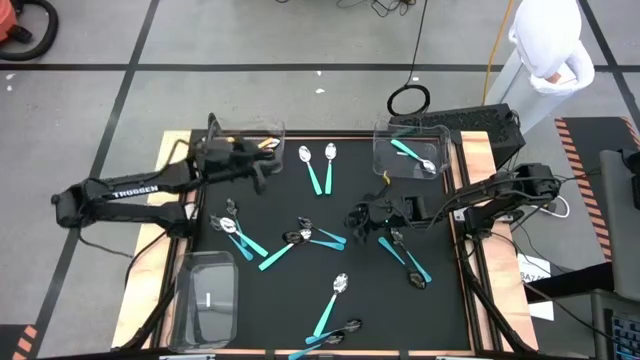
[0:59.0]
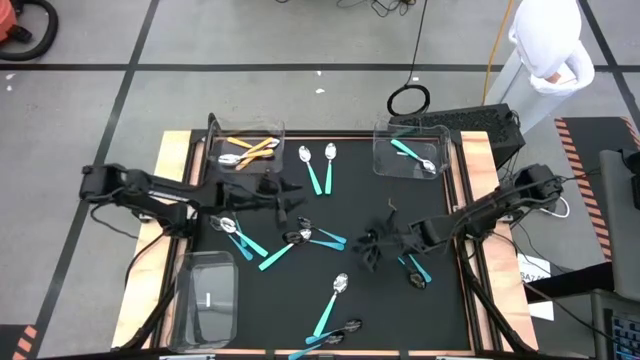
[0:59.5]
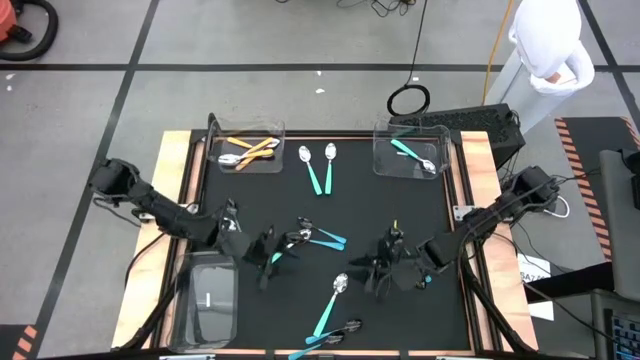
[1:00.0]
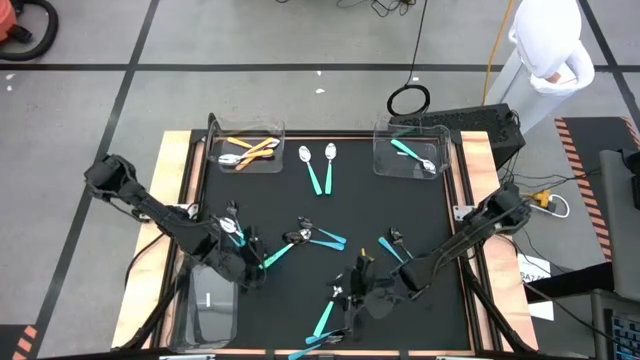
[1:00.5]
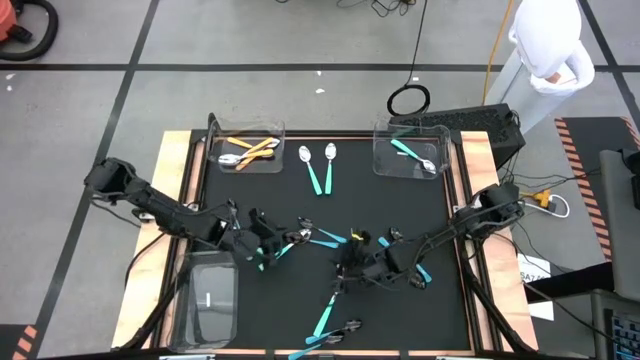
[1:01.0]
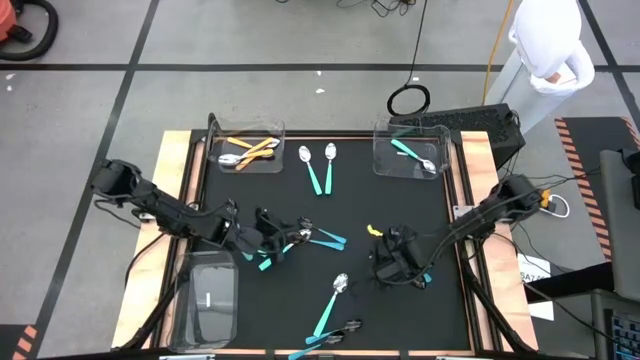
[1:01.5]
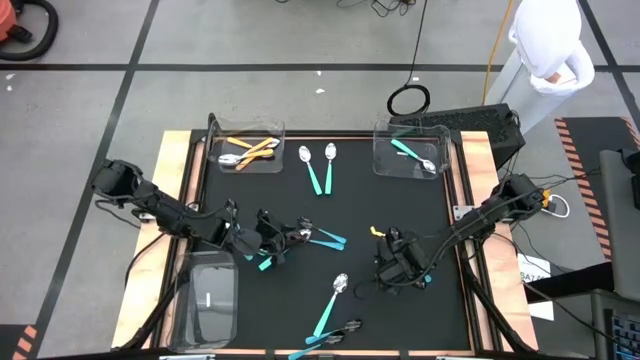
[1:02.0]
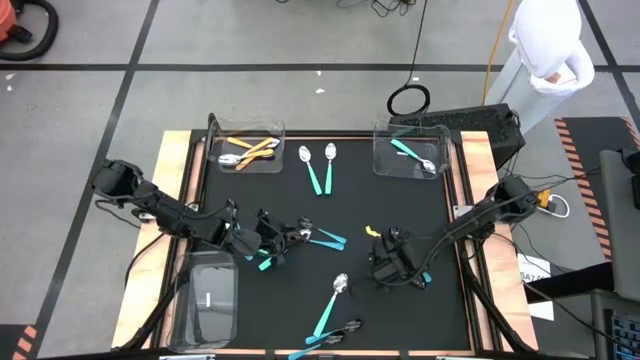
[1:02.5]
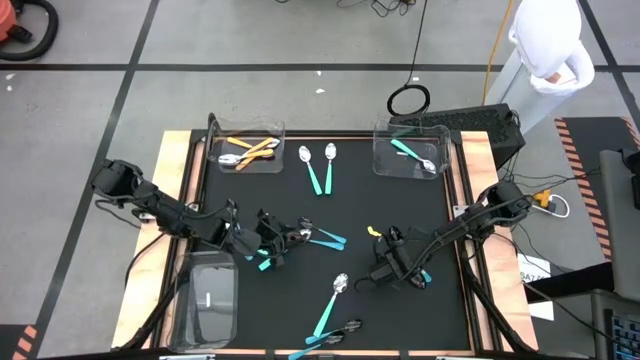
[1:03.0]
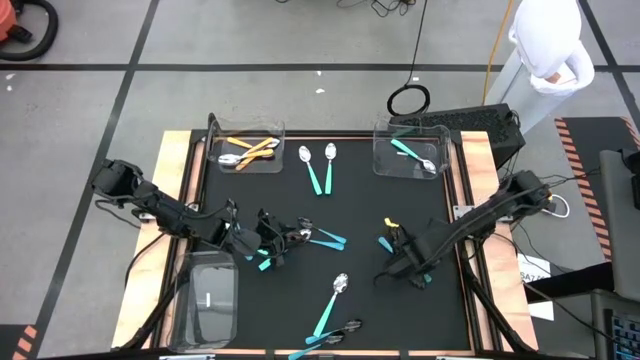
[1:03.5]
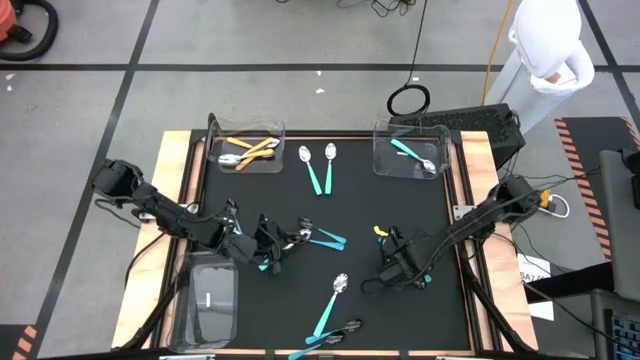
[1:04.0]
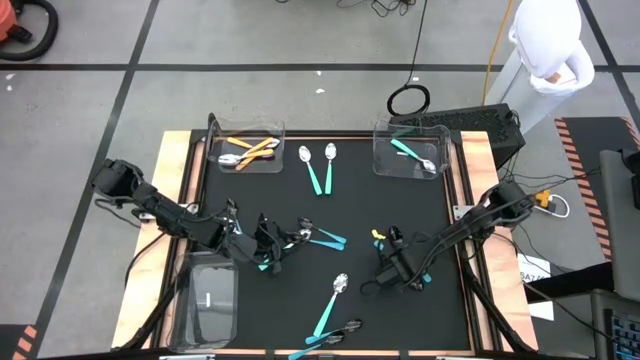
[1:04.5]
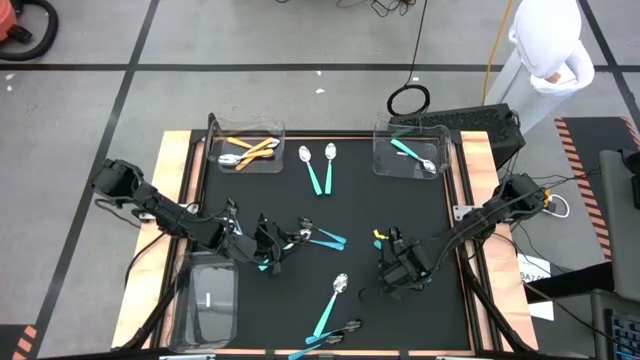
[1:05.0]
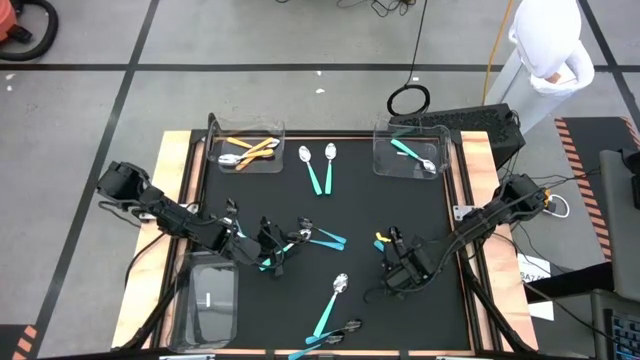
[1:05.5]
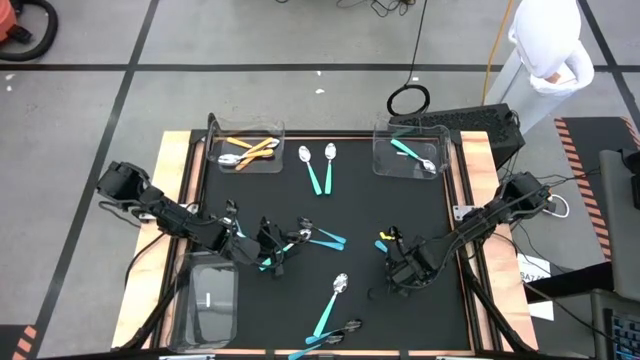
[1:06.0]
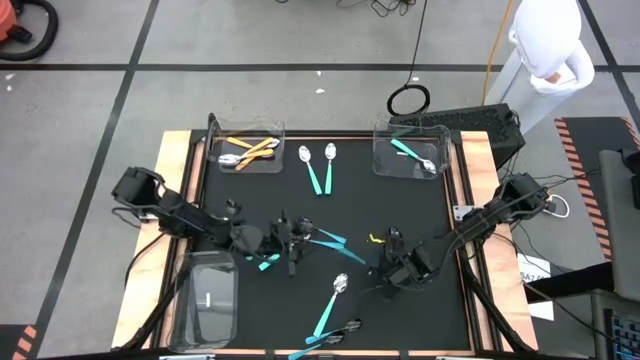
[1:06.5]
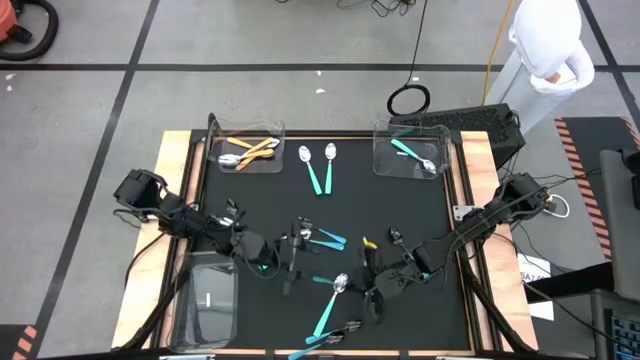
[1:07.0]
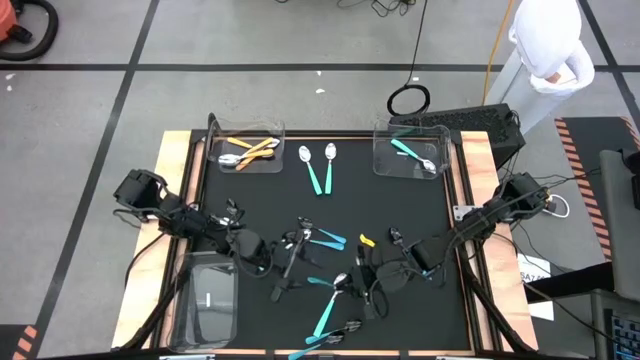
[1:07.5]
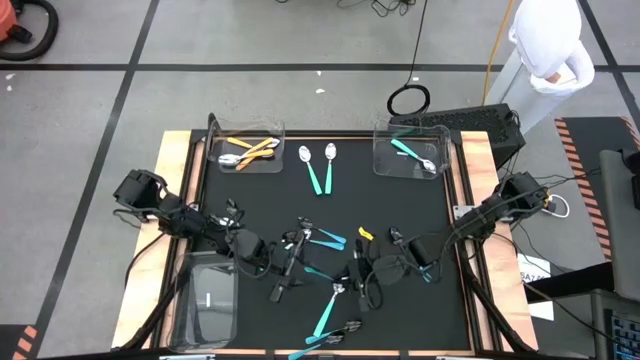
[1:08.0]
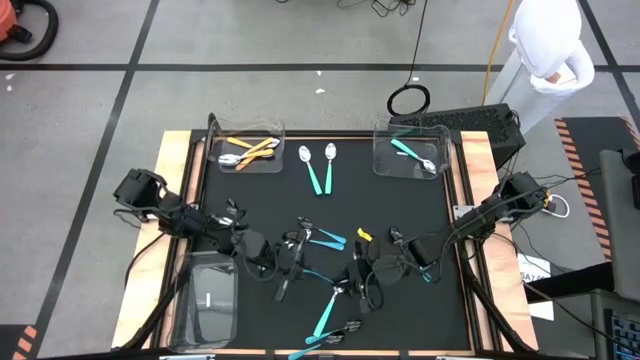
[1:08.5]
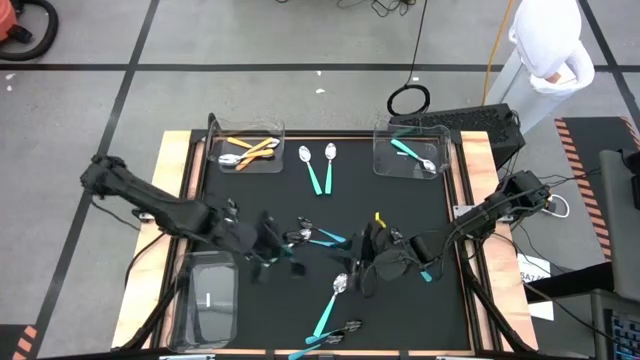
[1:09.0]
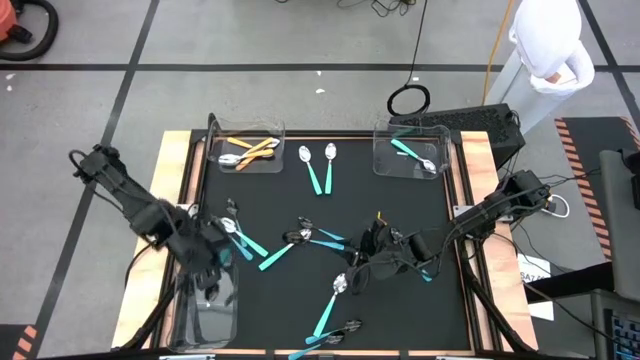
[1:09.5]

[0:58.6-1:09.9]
Task: Sort silverware by color (type)
Put the blue spoon into the bottom bin

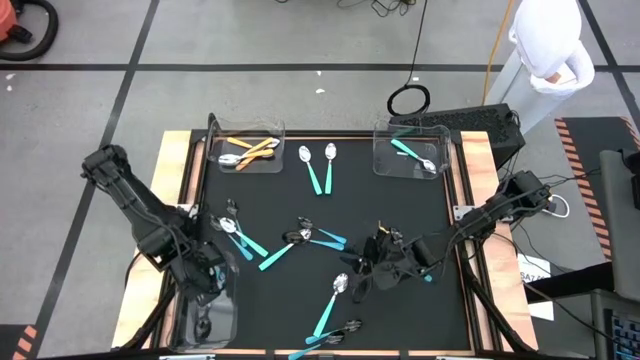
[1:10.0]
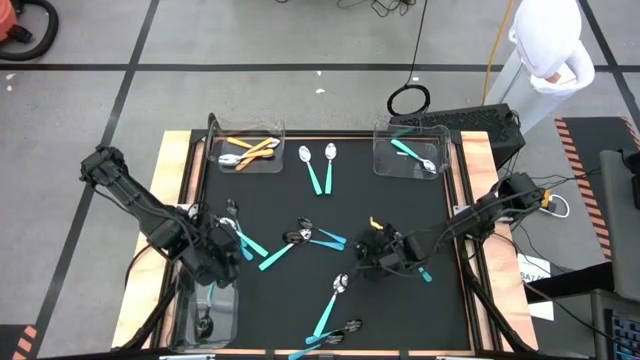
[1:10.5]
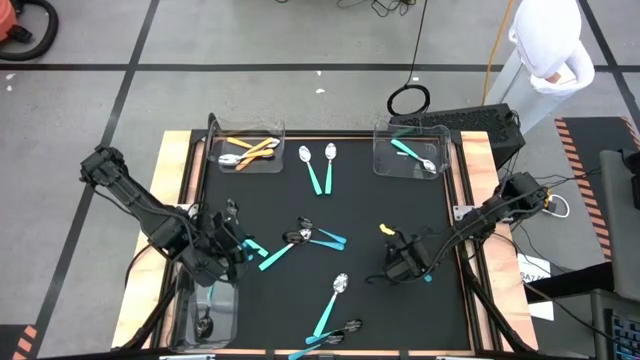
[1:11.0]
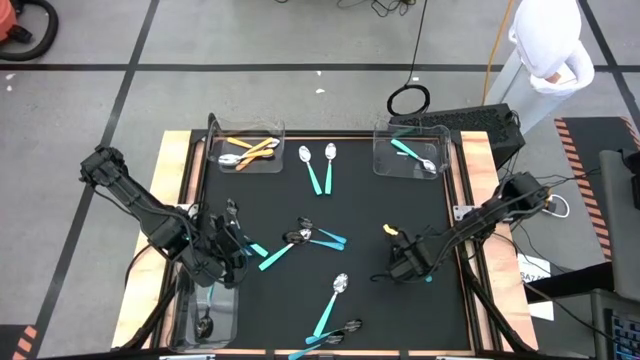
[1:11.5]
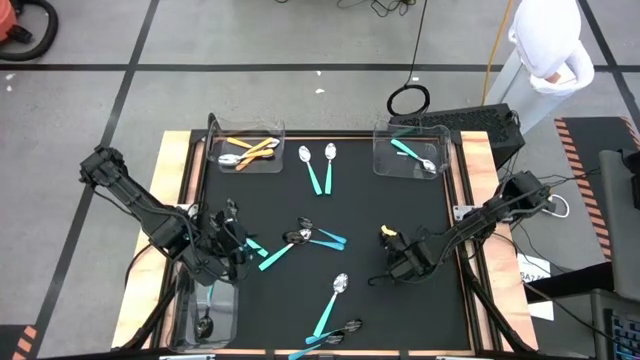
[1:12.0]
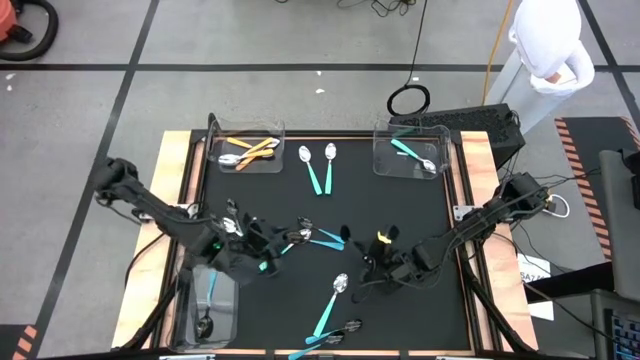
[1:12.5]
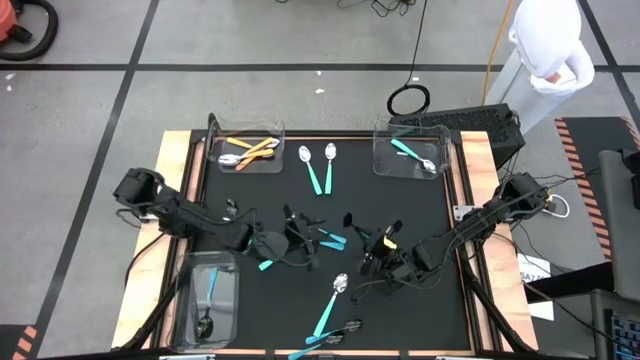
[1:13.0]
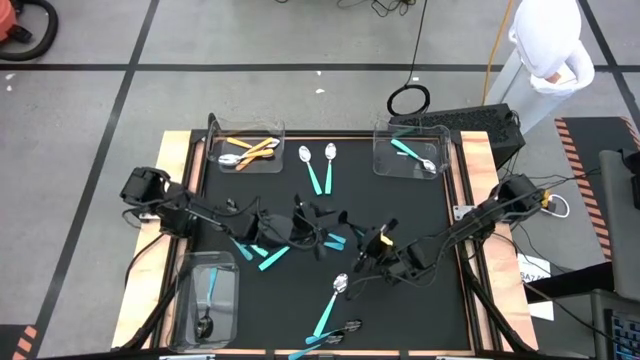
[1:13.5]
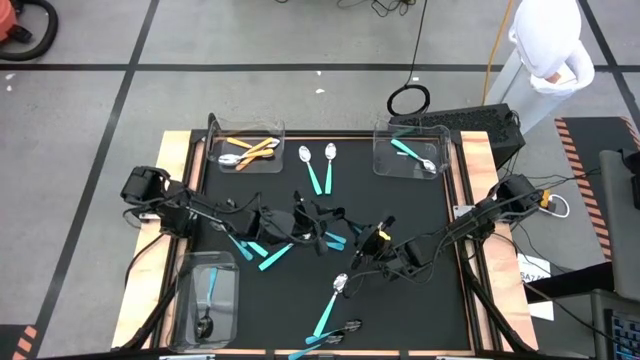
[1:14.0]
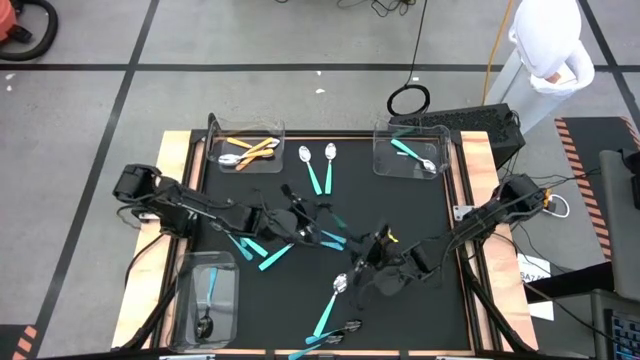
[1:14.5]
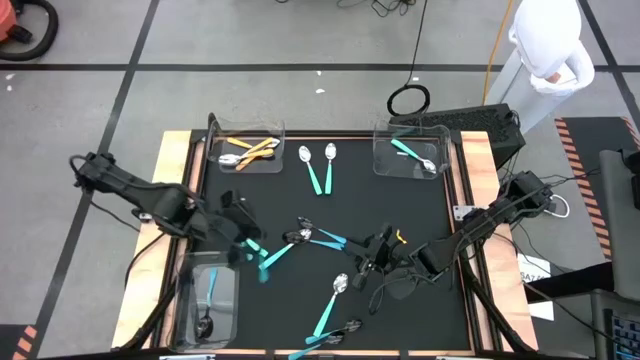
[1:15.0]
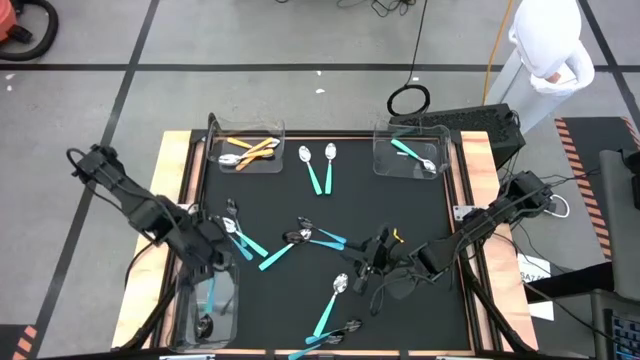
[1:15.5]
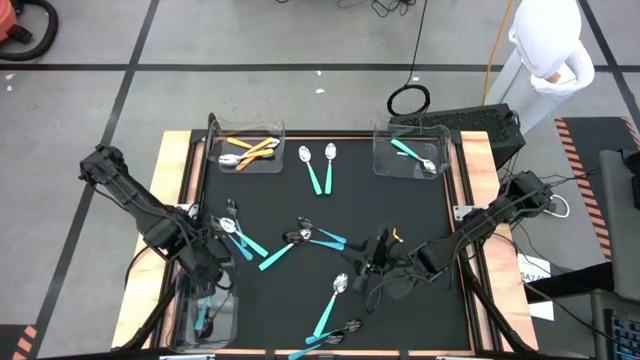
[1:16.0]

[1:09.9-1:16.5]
Put the blue spoon into the bottom bin

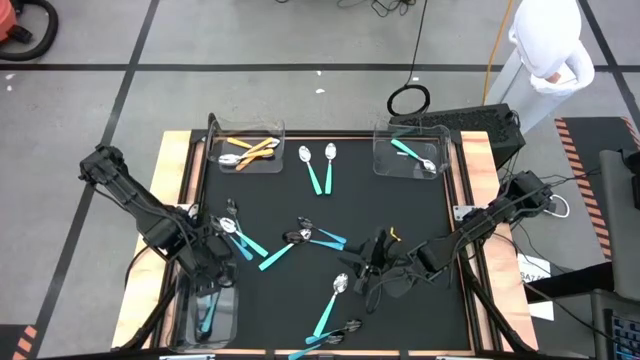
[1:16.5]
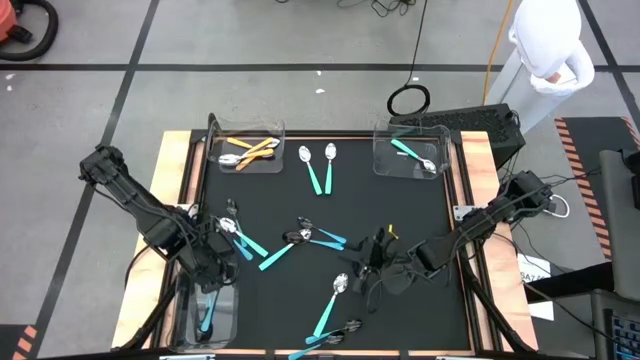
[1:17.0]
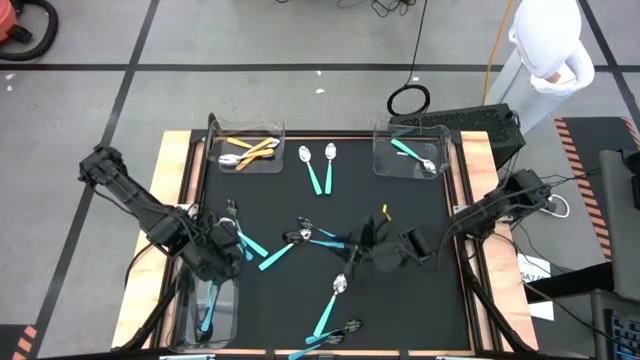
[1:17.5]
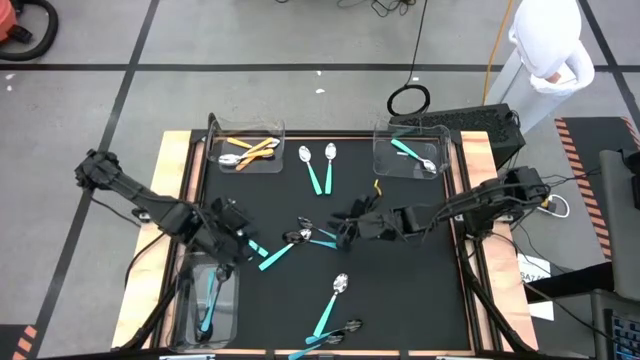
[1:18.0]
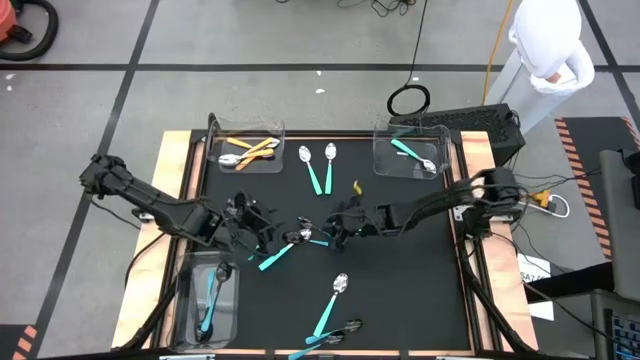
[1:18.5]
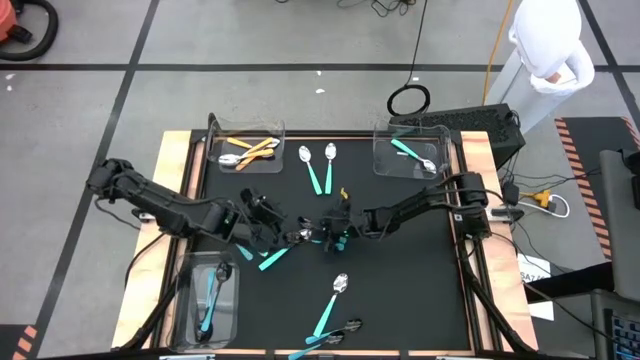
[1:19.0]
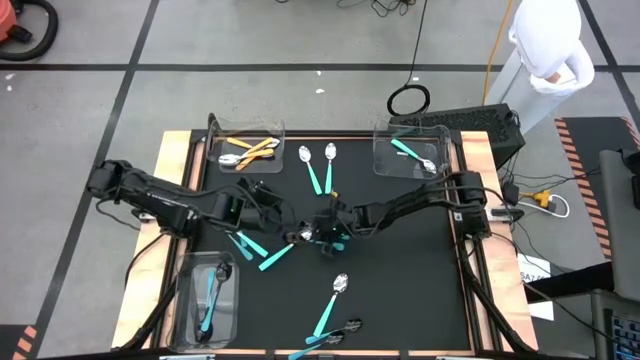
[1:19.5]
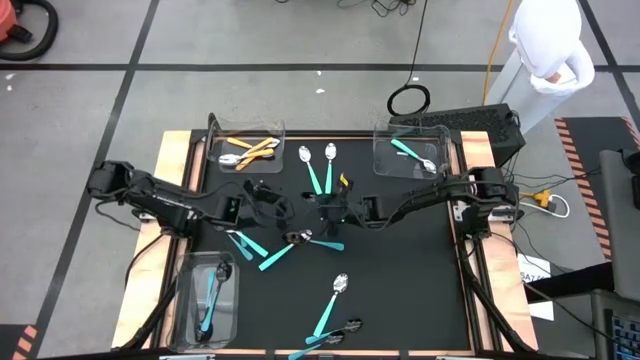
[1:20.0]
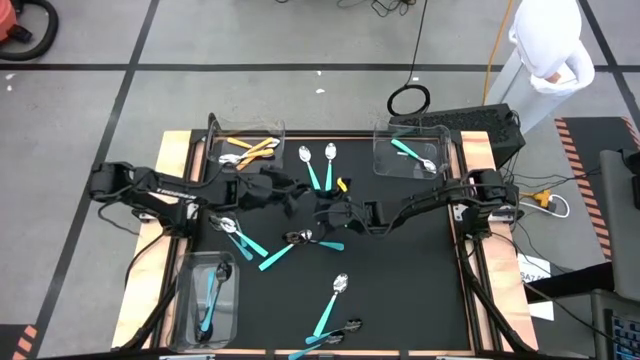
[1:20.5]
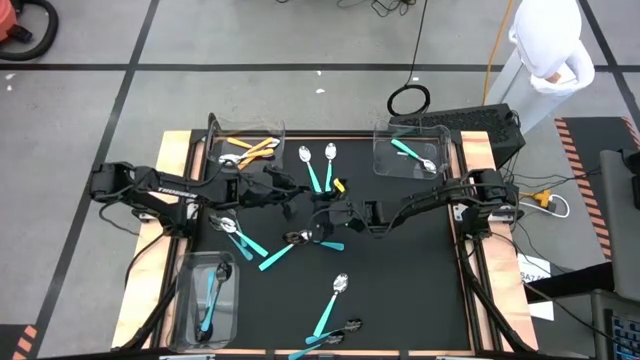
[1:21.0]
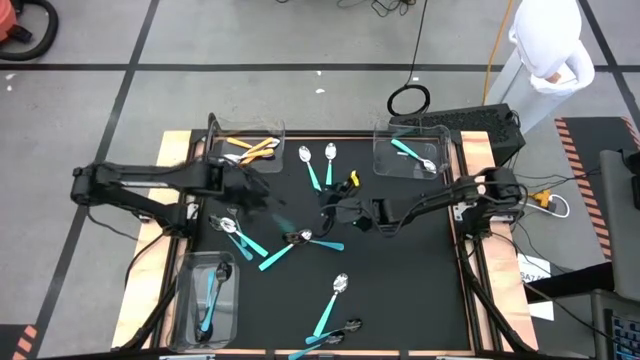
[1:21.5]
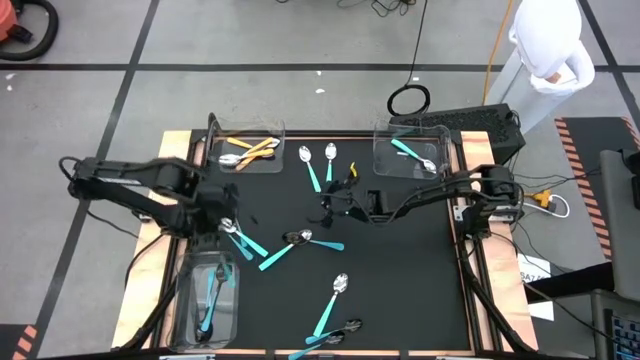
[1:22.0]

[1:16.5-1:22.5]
Put the blue spoon into the bottom bin
